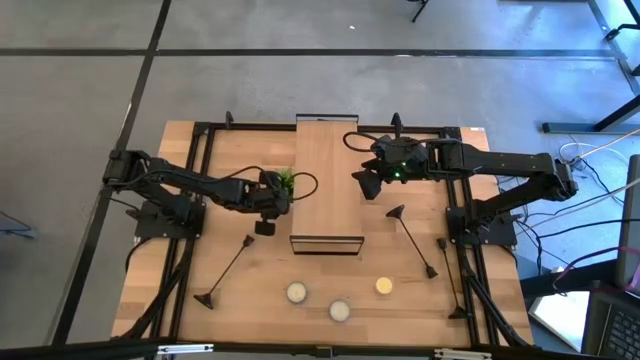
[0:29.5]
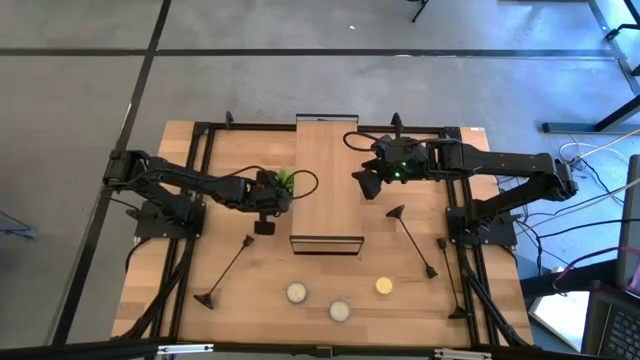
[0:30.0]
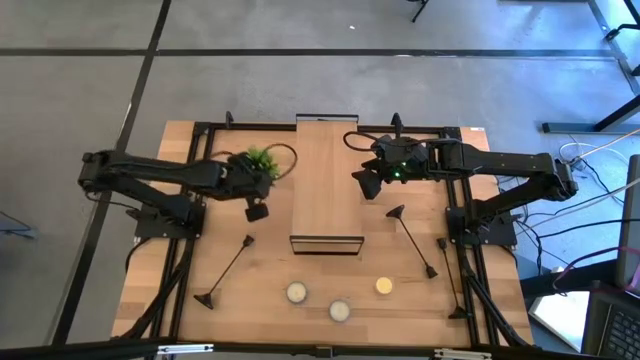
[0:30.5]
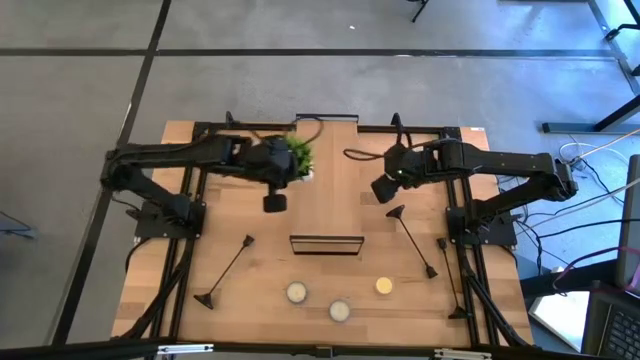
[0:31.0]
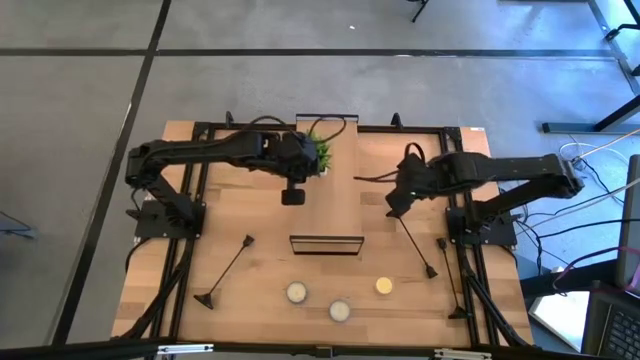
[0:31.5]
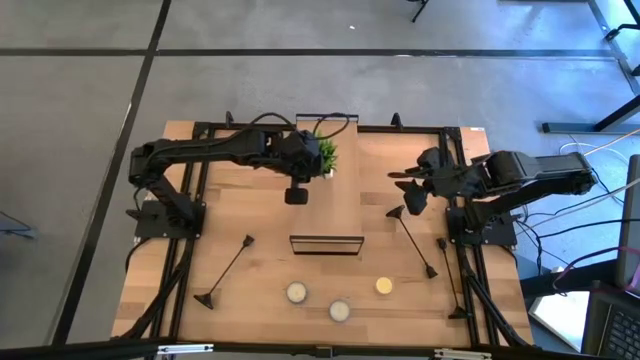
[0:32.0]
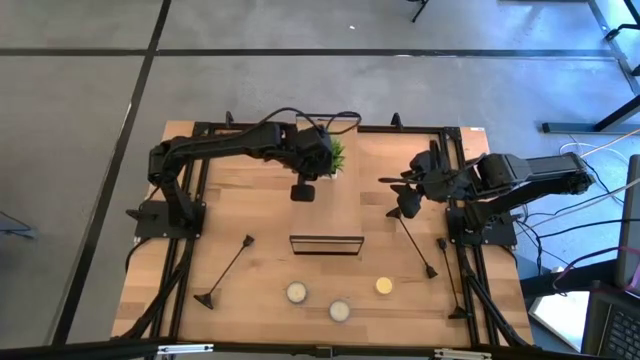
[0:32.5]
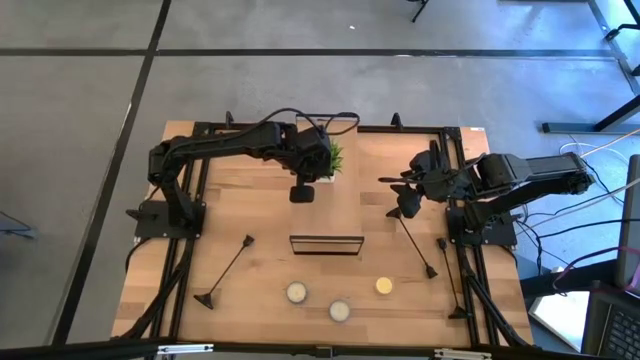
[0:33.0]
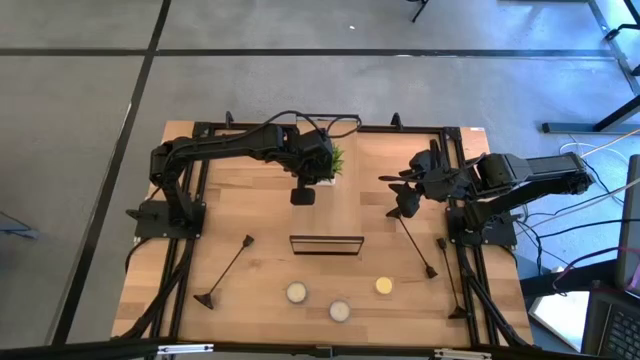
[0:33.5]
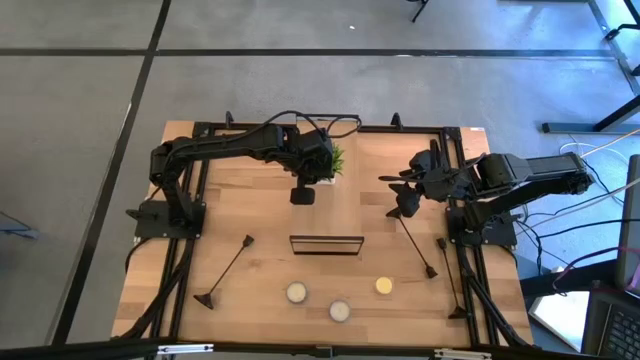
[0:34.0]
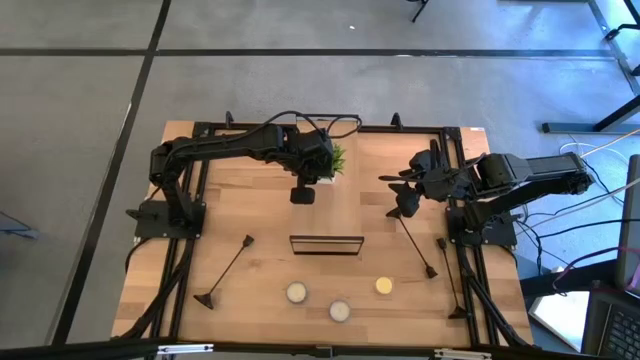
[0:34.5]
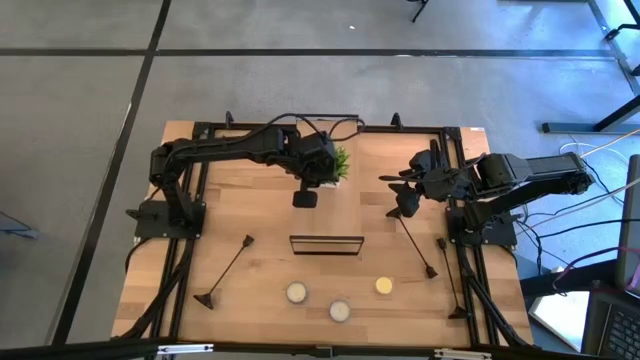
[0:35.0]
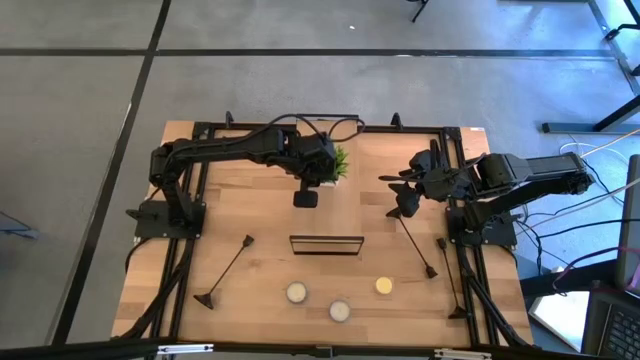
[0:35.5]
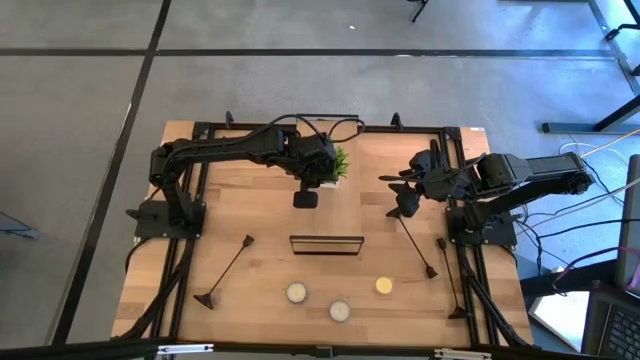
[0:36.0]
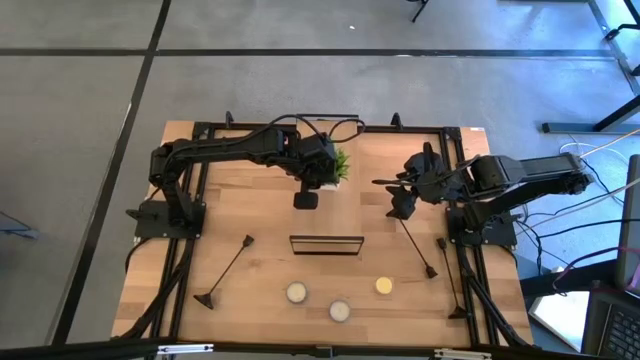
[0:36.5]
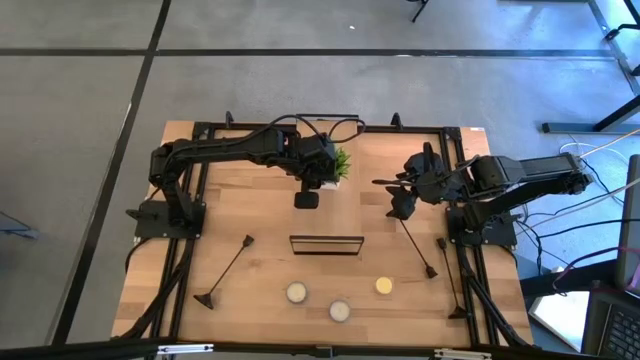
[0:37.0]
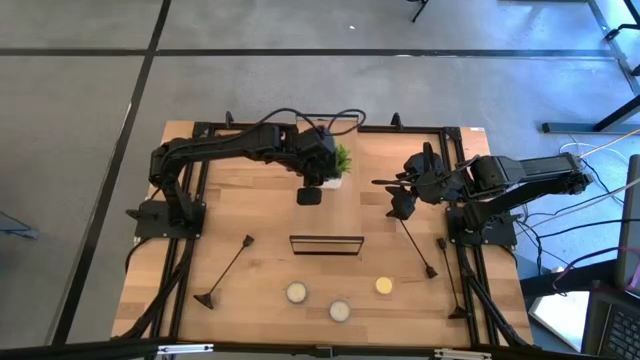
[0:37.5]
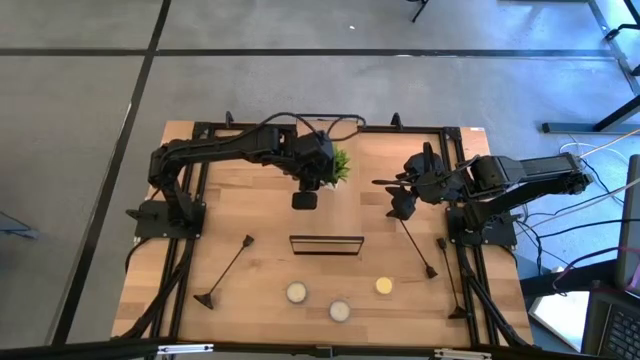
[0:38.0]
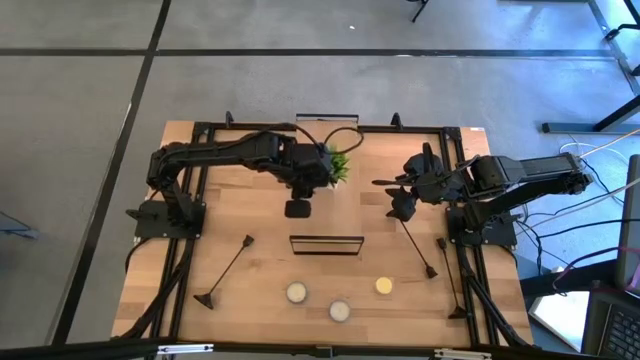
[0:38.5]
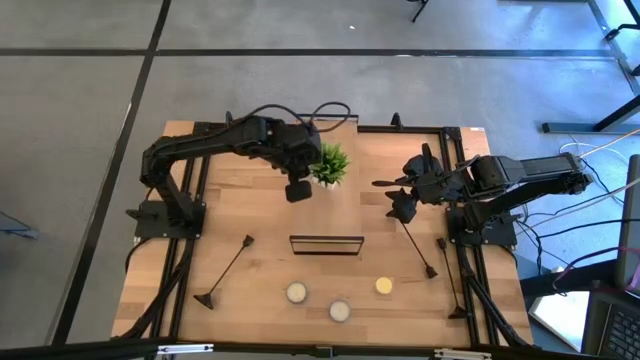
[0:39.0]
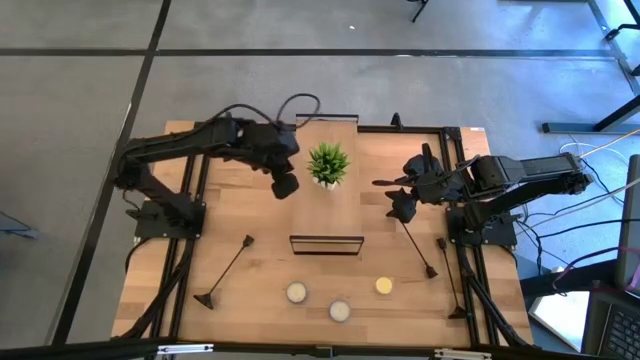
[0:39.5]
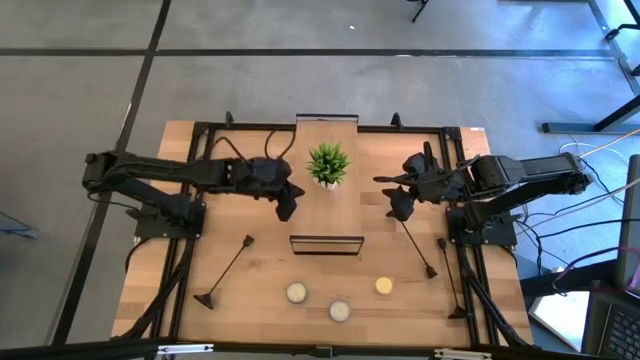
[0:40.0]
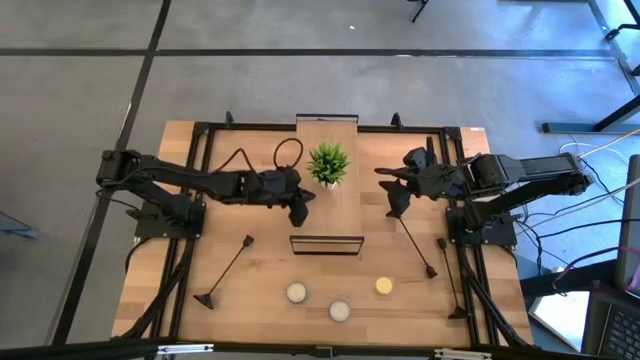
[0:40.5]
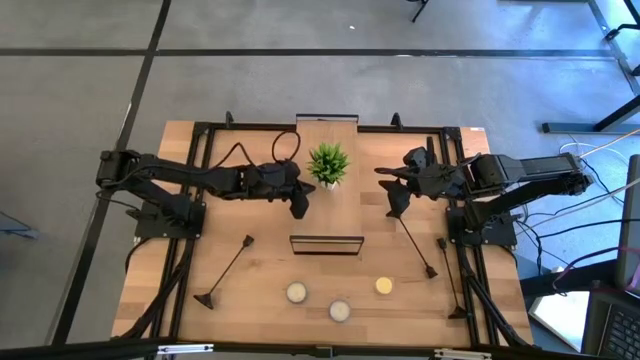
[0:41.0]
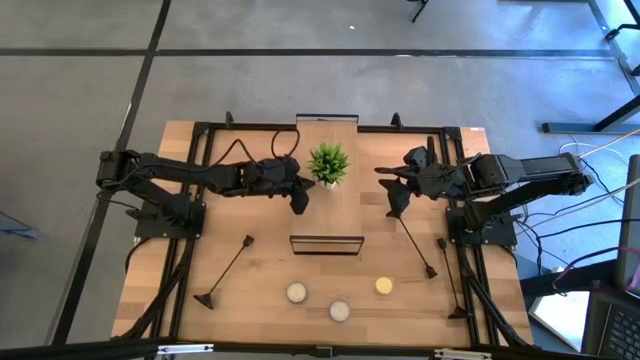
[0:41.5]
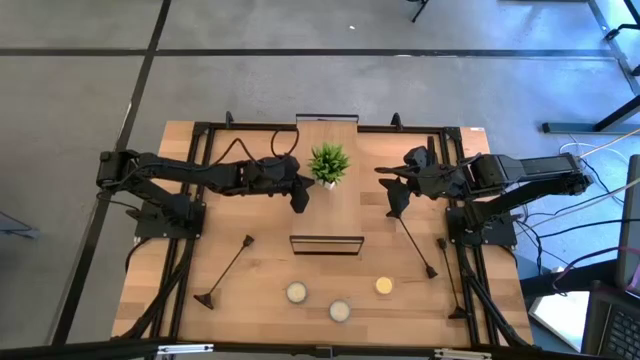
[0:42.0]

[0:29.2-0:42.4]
Task: Pick & Place candle stick holders
Put the flower vase on the shelf

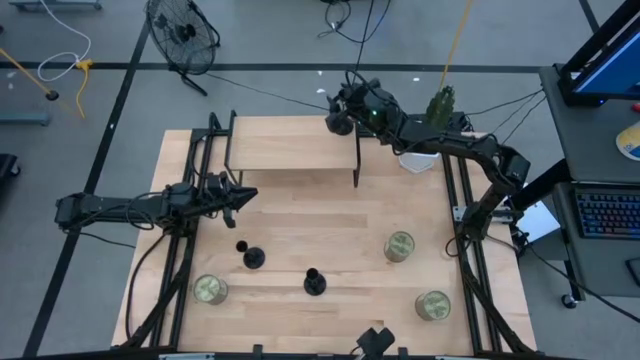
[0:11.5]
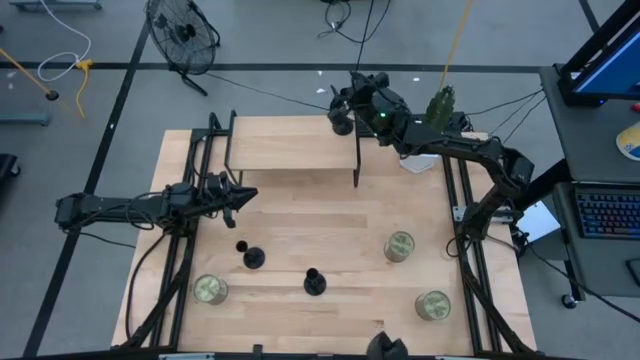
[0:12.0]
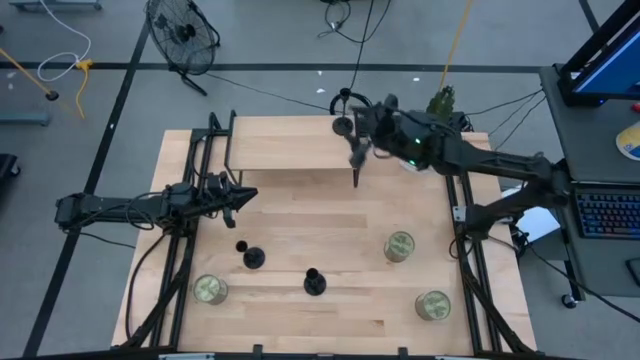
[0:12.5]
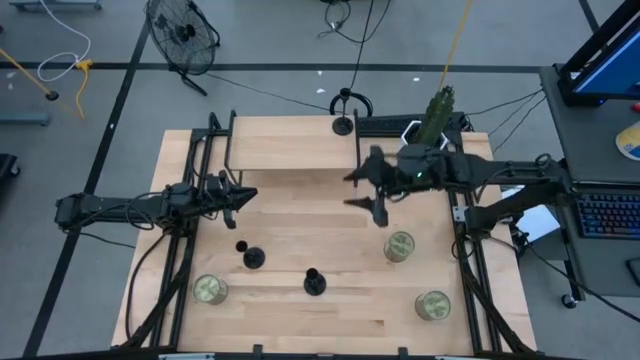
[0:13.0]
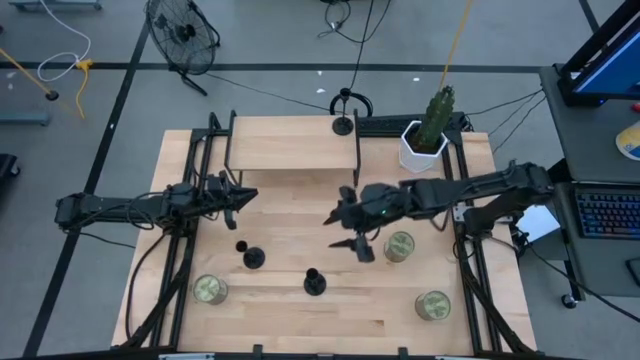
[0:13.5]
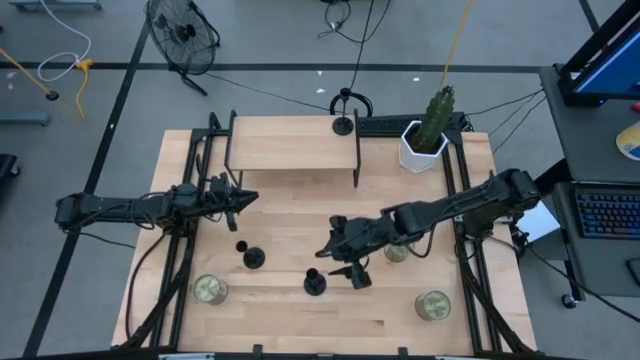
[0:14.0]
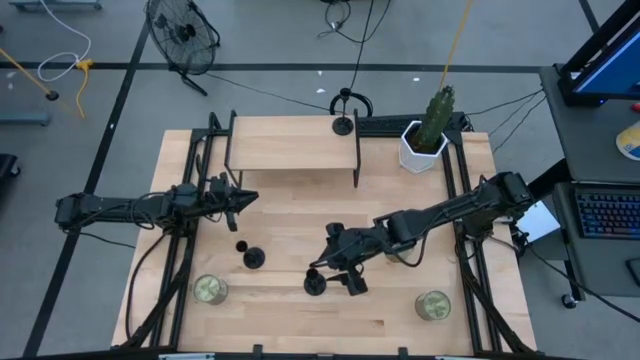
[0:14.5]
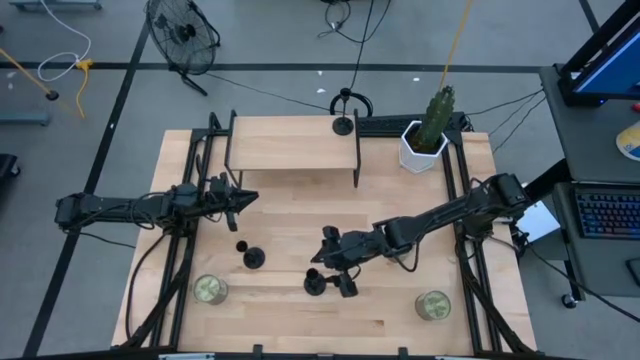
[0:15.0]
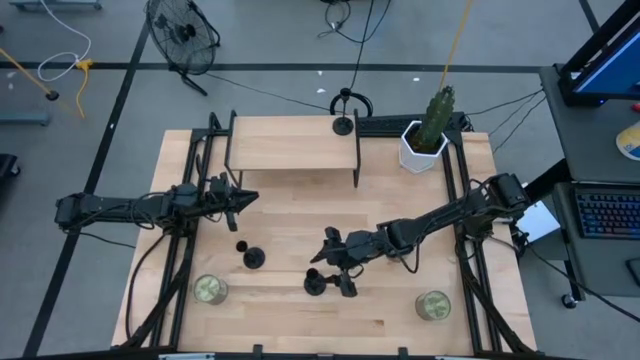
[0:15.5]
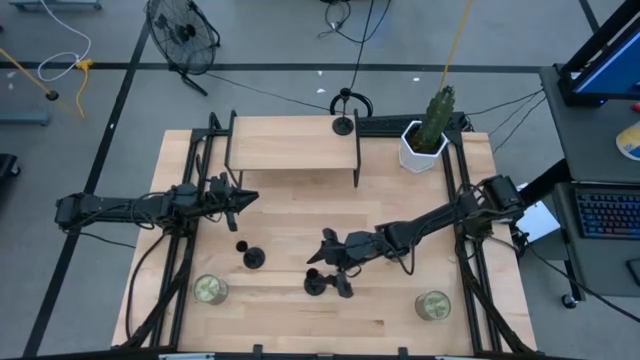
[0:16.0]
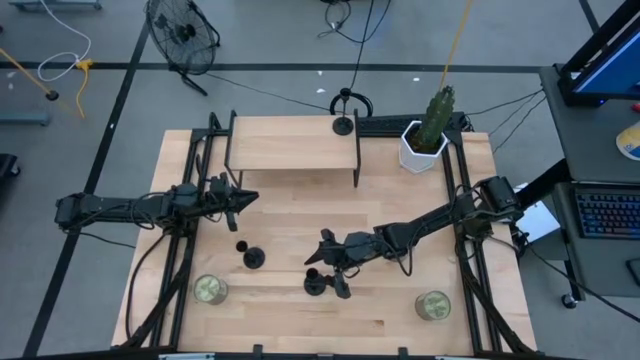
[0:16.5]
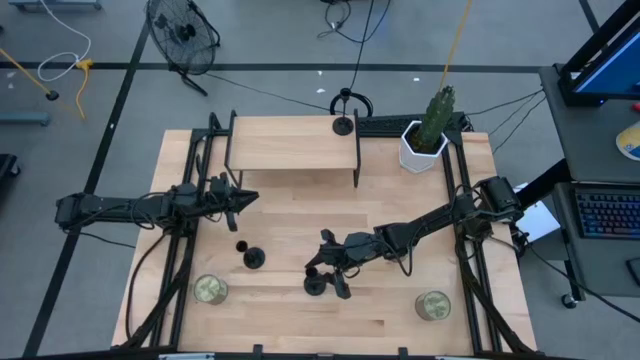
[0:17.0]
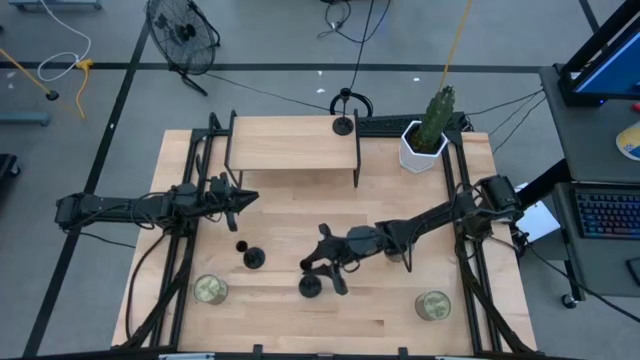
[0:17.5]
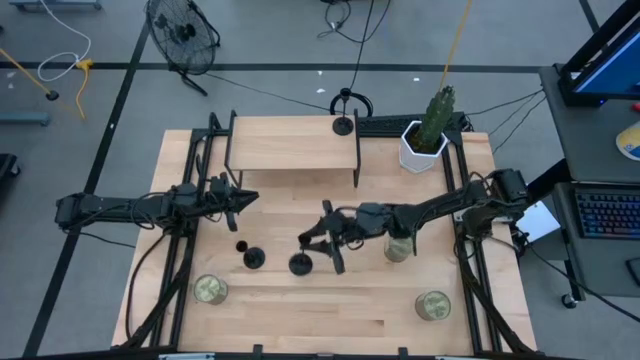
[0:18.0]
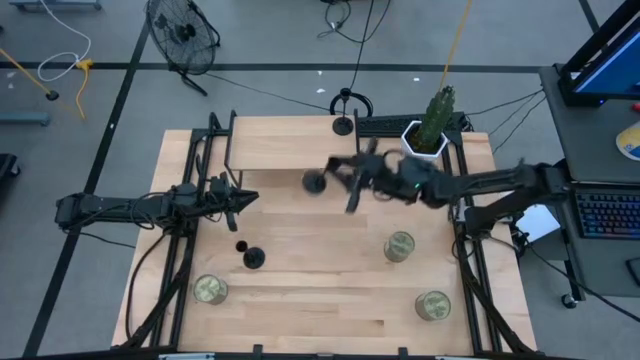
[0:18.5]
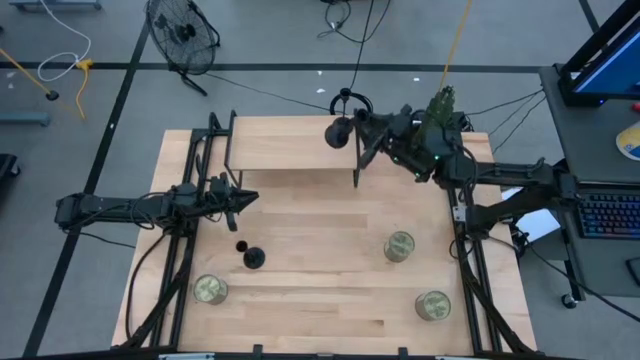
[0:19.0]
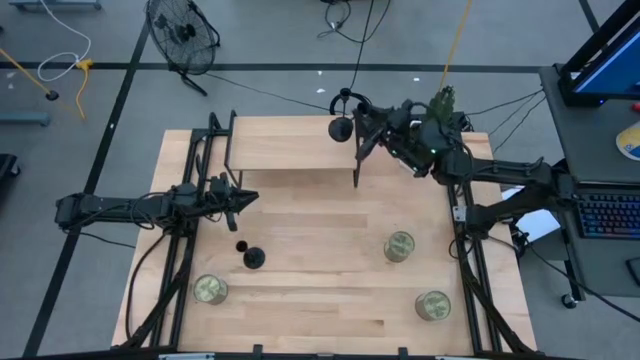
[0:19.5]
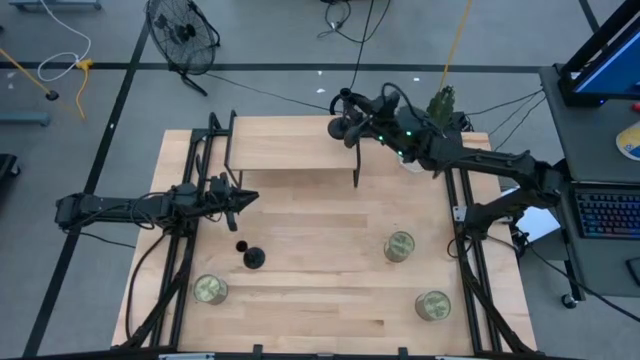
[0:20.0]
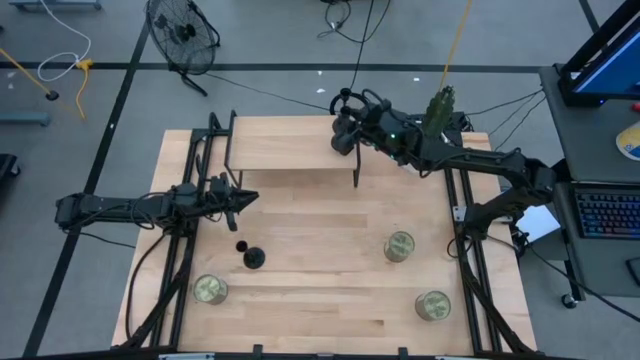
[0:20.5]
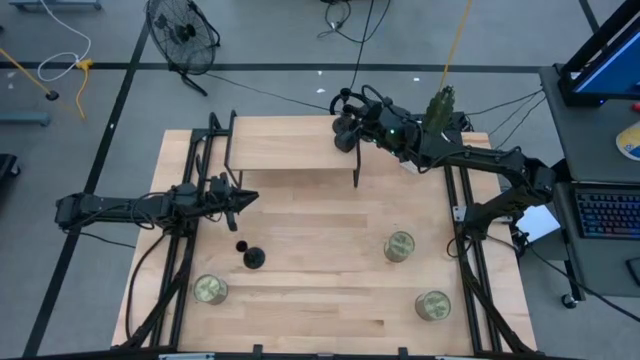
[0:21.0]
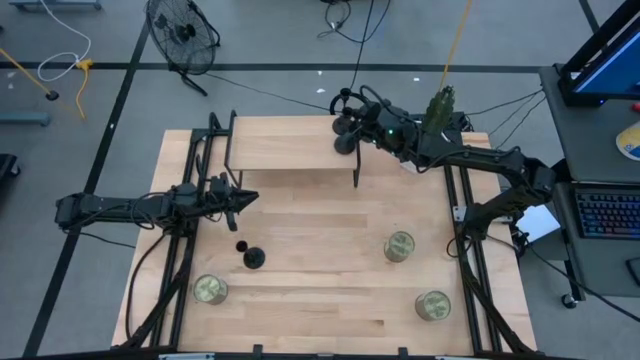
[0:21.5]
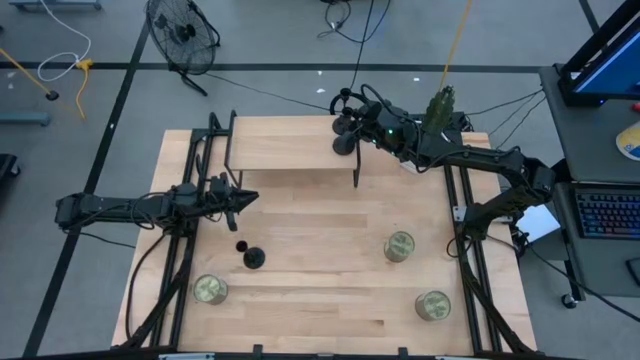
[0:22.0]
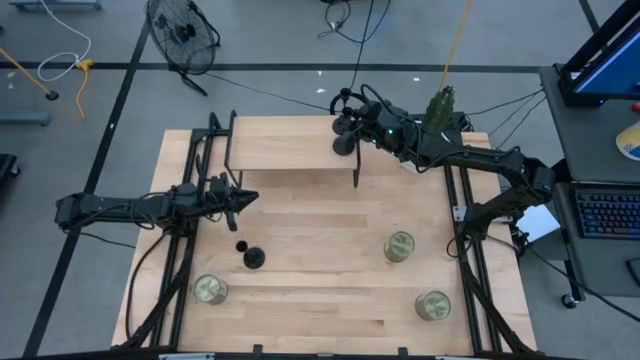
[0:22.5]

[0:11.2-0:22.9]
Task: Pick & Place candle stick holders
Put the right candle holder on the shelf
